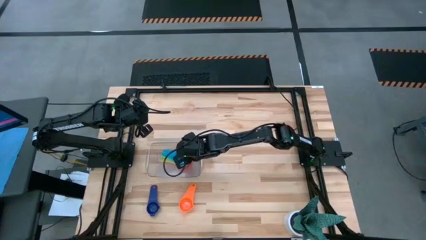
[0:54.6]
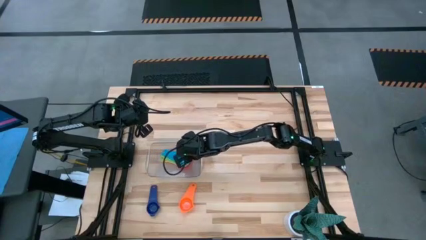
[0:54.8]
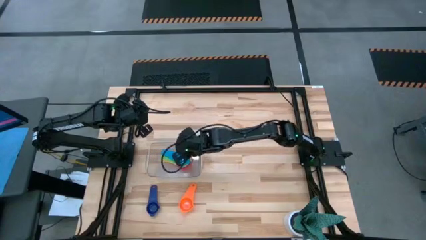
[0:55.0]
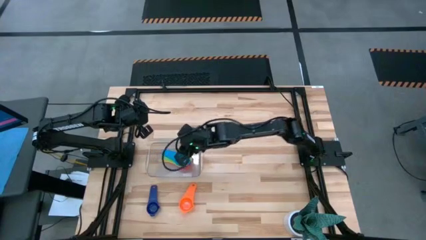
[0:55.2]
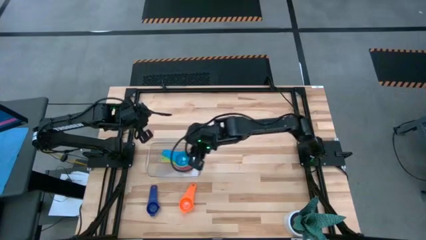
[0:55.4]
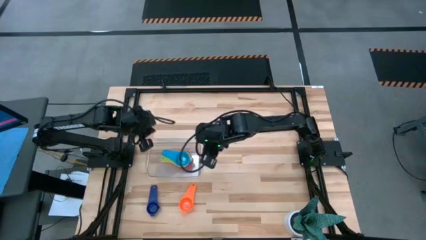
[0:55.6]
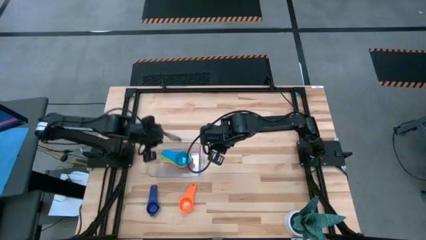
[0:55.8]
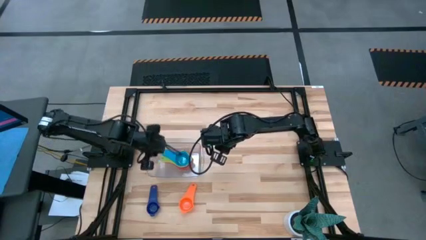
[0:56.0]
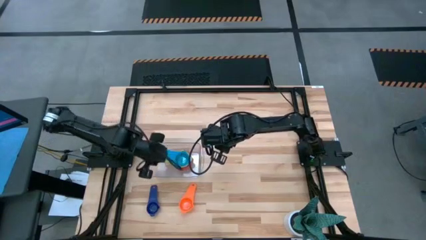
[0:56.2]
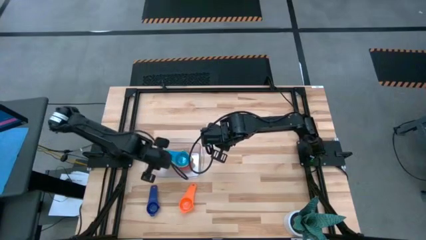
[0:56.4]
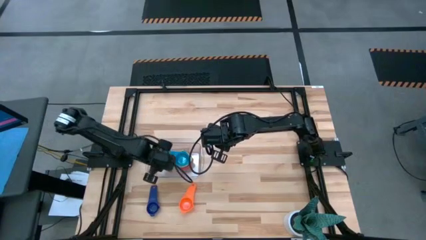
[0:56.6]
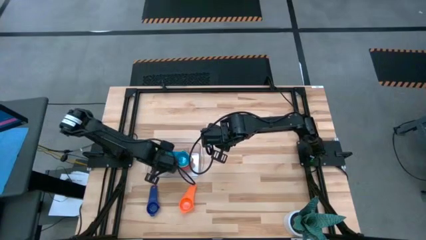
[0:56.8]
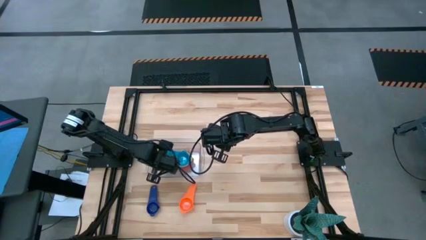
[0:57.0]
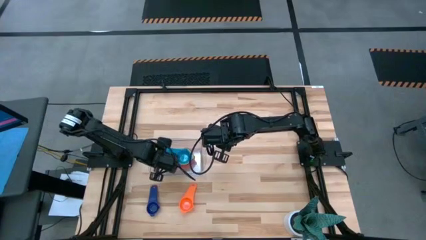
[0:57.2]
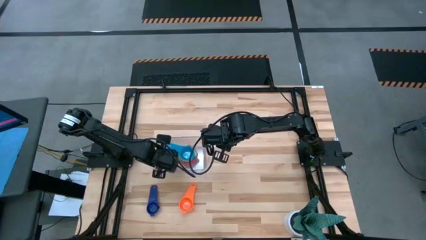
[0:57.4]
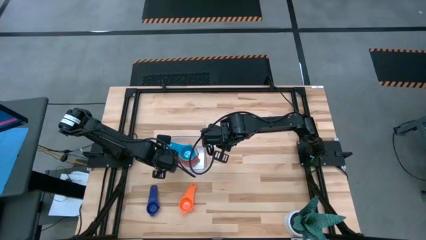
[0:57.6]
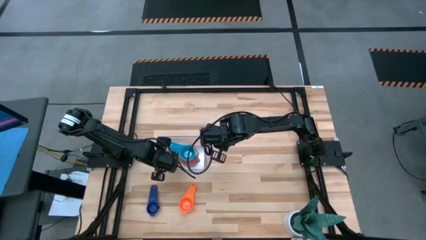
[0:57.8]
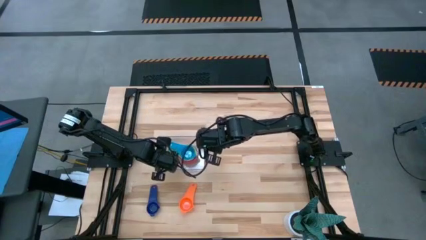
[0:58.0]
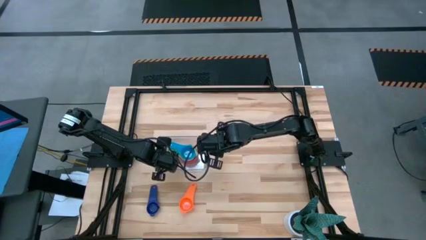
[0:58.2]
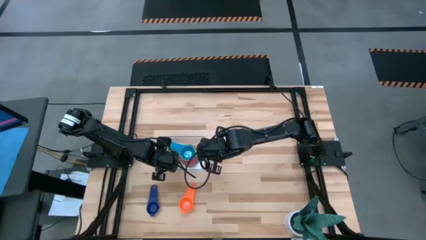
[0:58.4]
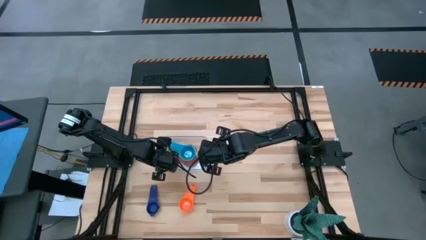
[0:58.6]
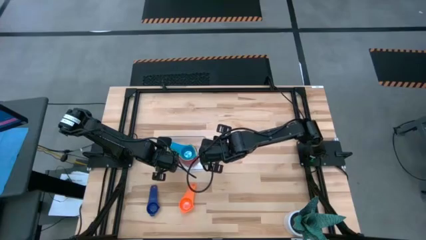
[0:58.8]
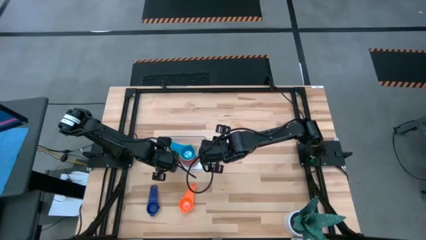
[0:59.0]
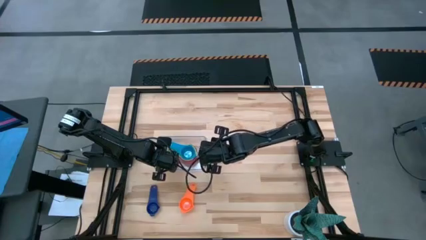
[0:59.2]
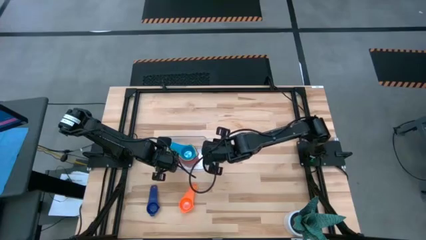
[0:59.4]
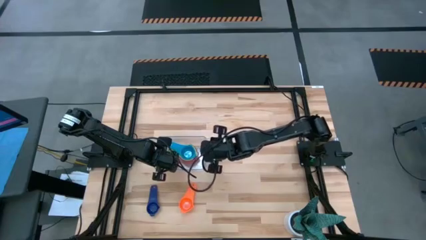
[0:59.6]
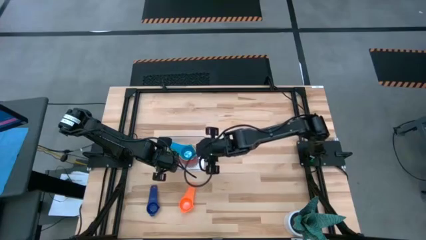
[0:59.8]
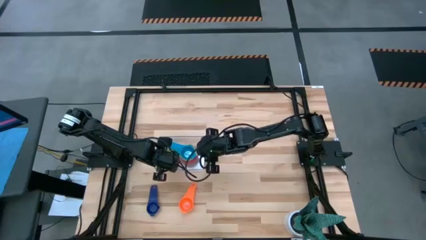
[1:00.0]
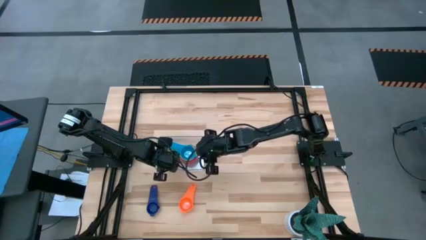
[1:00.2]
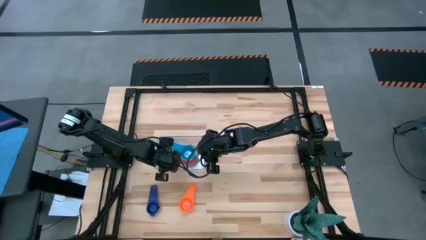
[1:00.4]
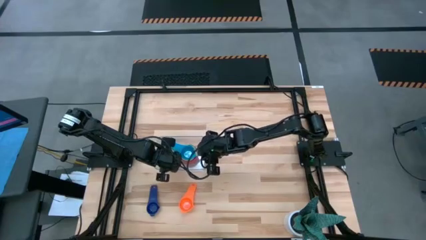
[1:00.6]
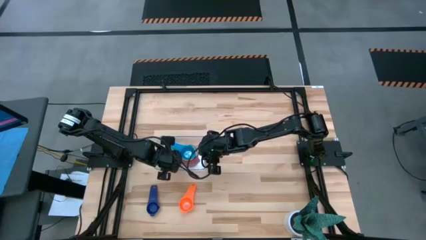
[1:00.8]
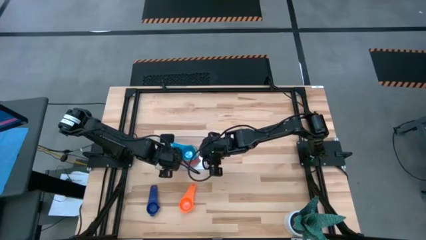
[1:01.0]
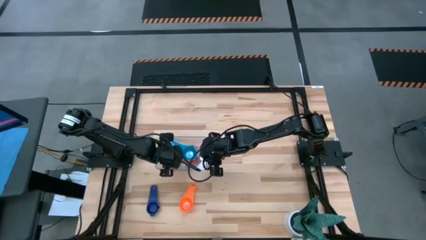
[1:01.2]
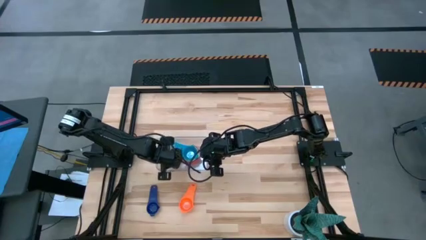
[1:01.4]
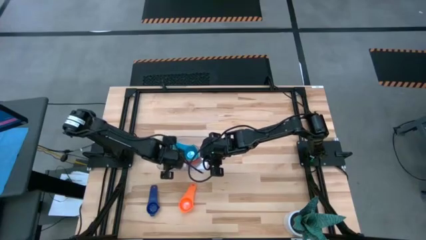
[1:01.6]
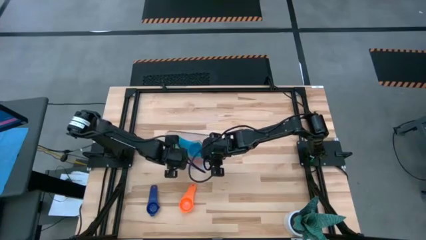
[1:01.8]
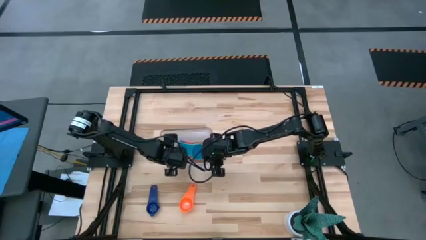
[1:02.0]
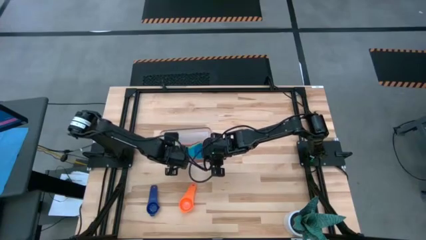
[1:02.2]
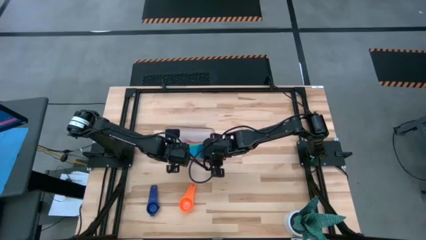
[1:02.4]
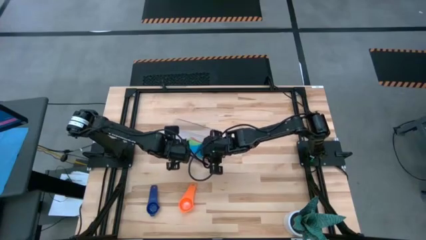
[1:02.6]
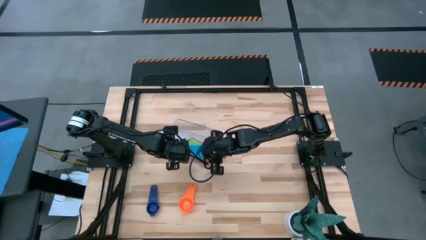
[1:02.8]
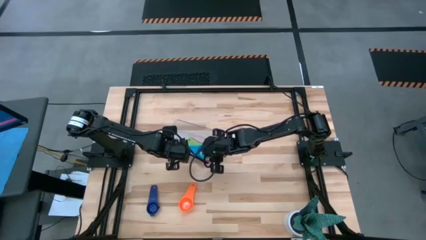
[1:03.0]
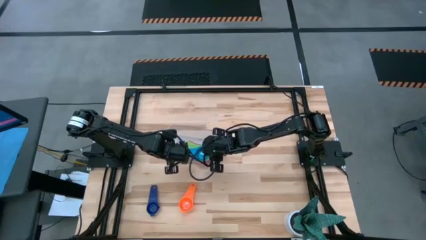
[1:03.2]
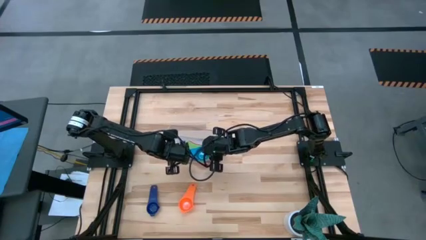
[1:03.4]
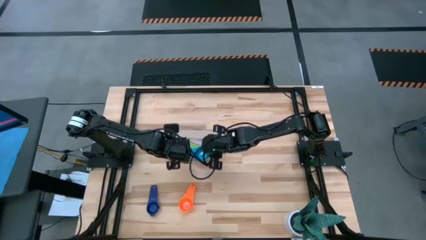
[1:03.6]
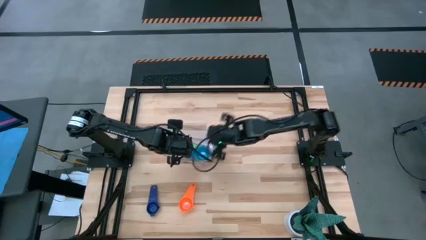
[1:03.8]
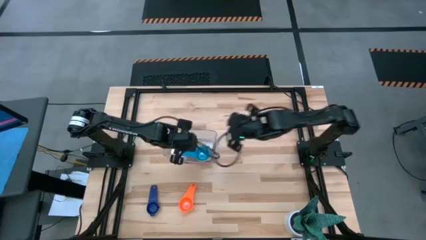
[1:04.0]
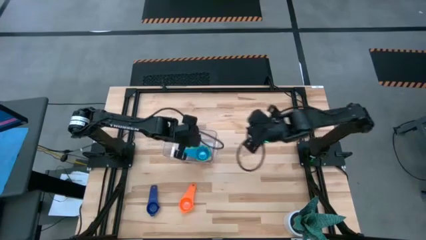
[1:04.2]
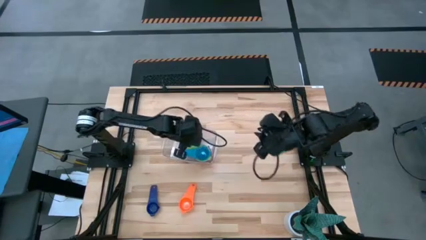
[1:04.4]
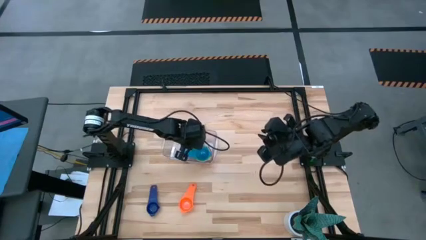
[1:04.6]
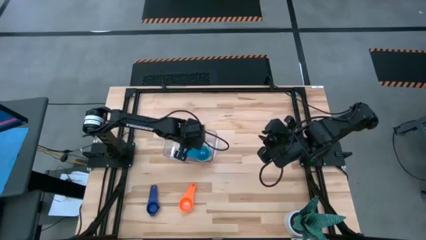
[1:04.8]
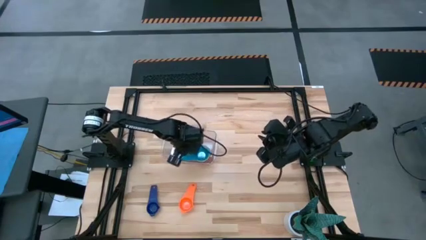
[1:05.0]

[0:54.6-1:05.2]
Task: Nest measuring cups in basket
Adjust the stacked measuring cup in the transparent bin

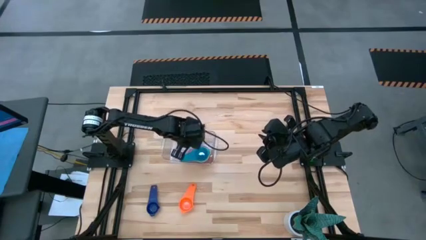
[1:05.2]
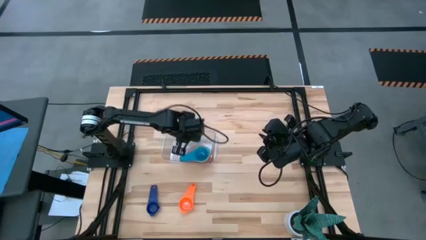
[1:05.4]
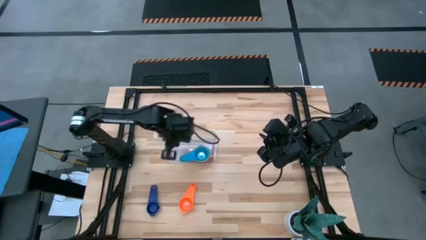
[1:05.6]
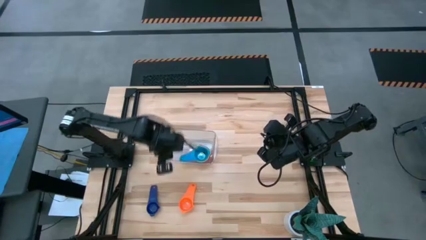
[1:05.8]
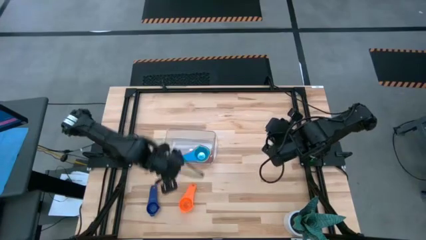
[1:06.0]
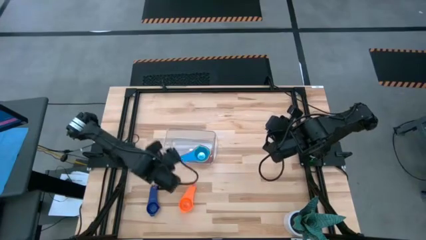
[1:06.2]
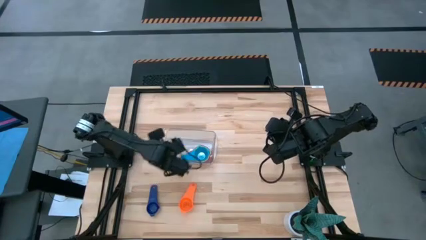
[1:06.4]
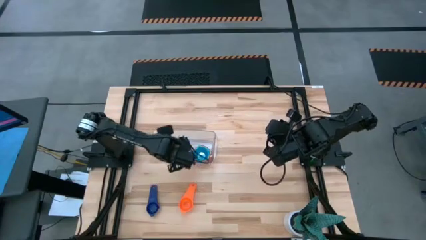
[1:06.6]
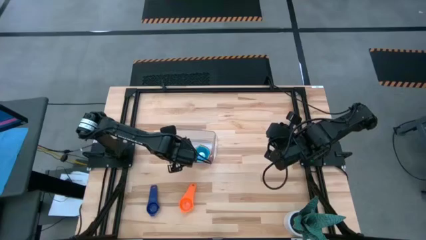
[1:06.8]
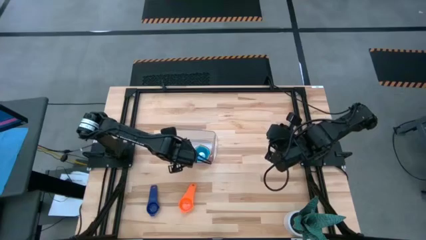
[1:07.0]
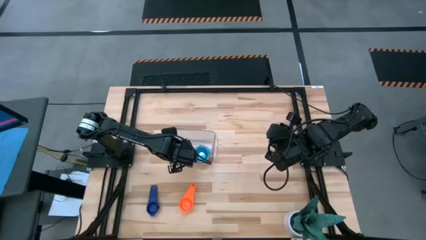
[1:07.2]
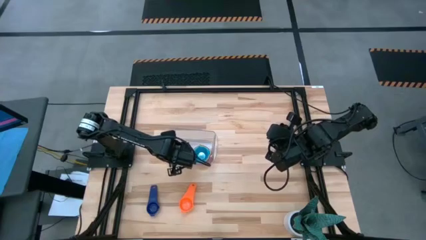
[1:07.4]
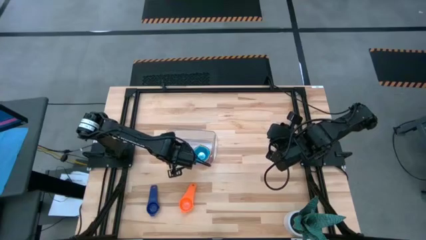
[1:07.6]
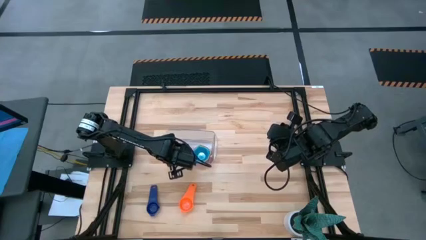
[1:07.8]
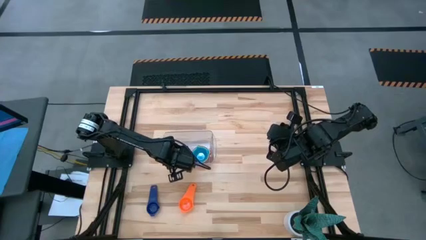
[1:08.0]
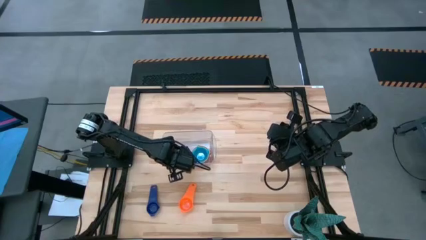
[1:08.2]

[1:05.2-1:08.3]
Adjust the transparent bin

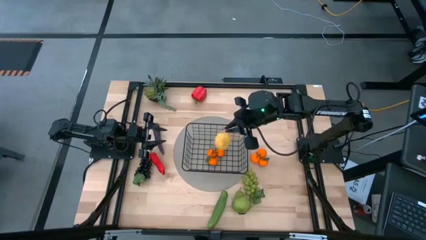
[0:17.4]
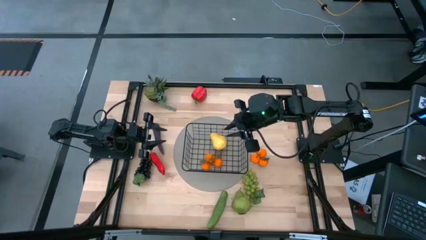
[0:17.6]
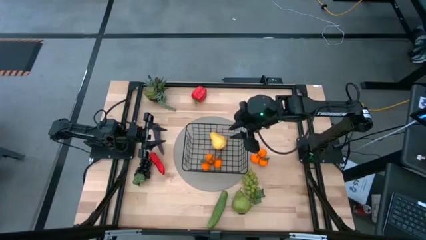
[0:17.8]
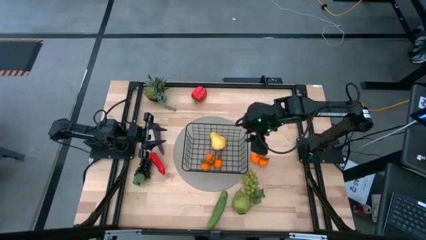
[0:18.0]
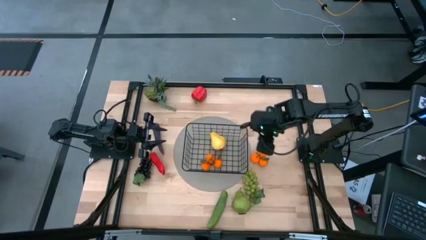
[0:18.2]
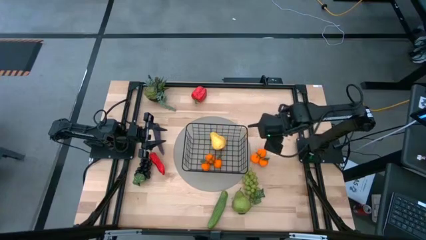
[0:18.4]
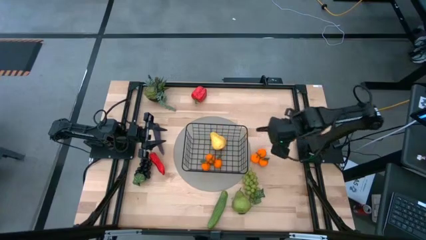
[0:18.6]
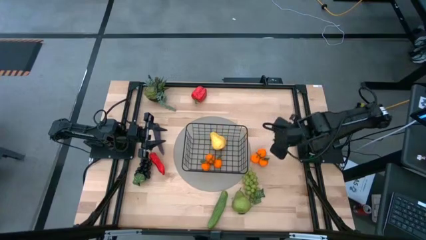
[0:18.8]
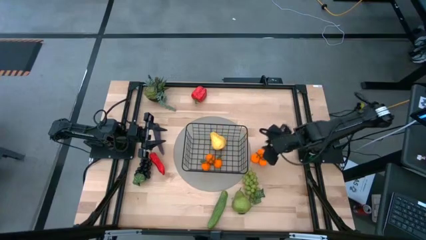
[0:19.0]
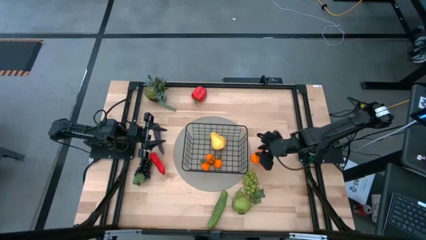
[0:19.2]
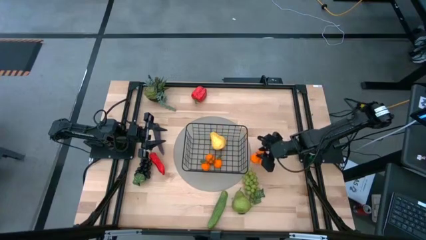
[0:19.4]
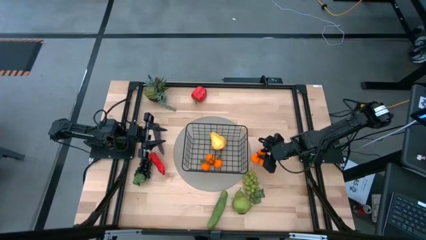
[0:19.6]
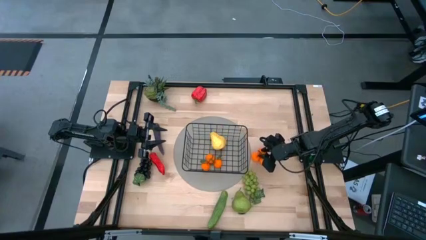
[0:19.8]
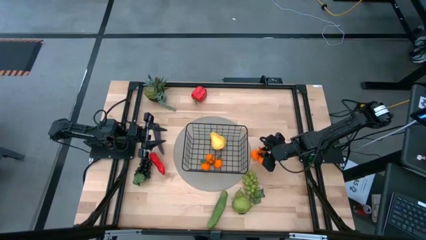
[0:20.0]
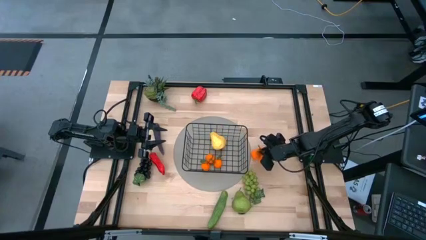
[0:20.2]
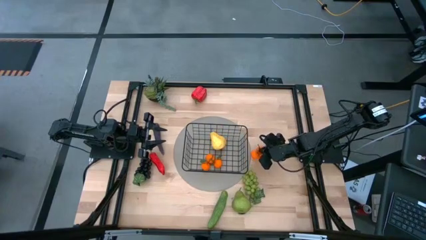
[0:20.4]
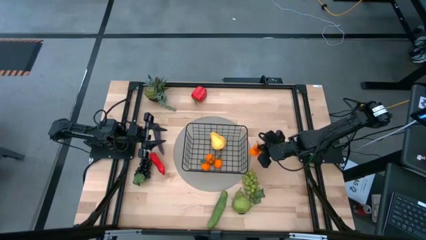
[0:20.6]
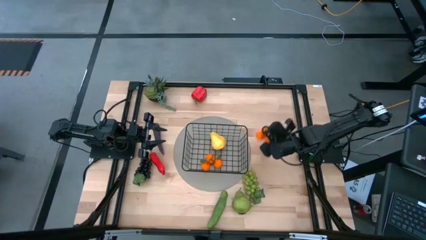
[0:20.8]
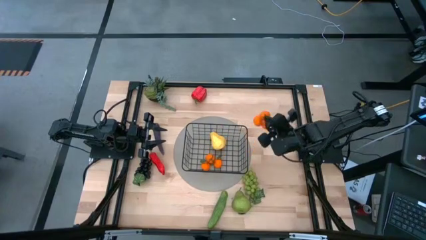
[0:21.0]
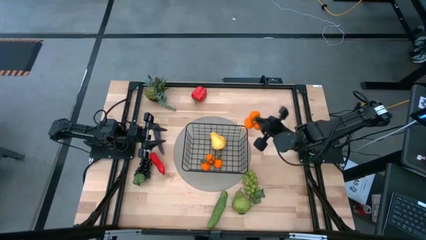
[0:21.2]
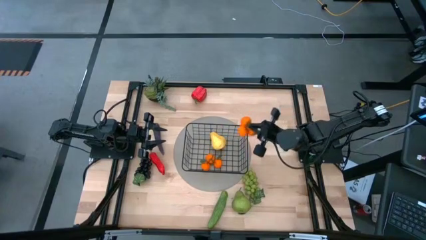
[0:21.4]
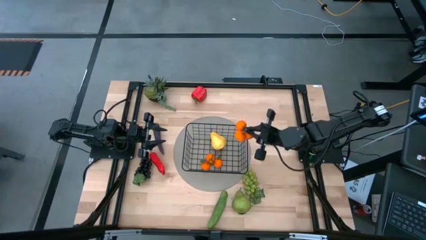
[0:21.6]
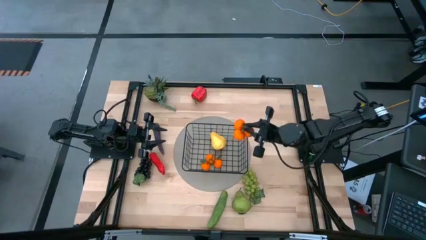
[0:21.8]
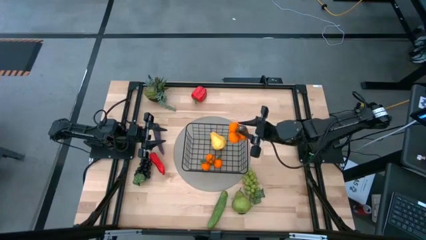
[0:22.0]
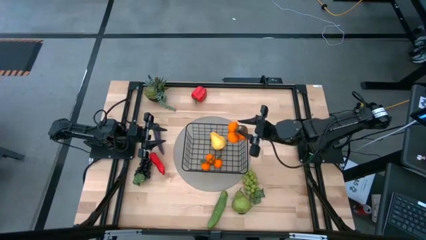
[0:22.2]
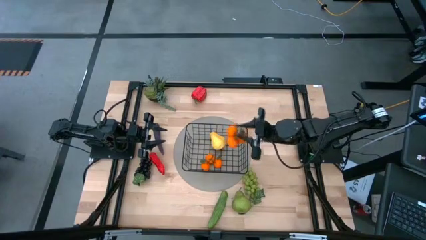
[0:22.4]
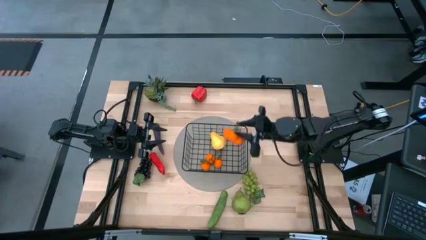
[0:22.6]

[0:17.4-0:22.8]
Task: Build produce basket
Put the tangerine into the black wire basket
